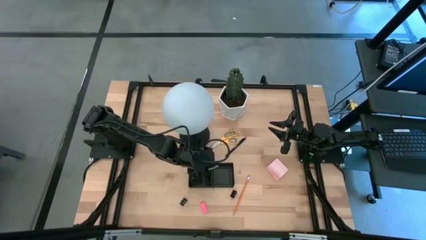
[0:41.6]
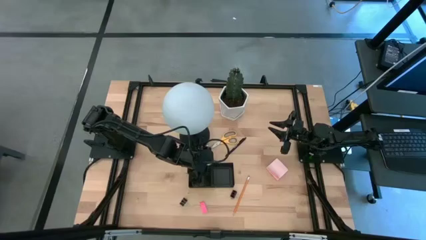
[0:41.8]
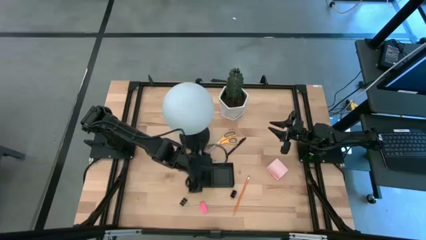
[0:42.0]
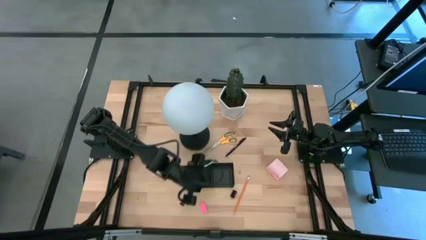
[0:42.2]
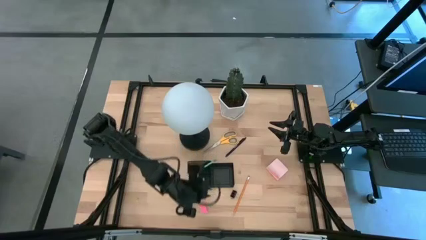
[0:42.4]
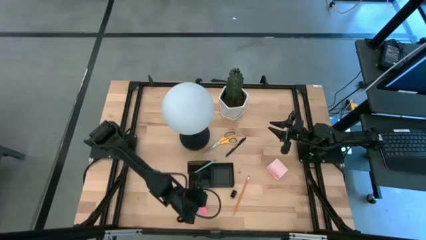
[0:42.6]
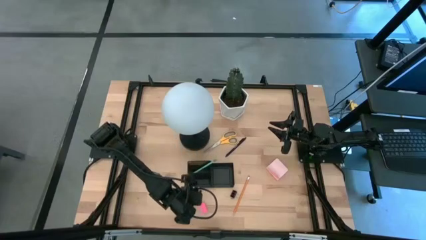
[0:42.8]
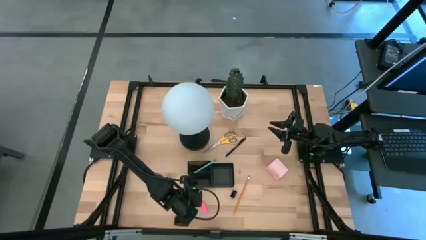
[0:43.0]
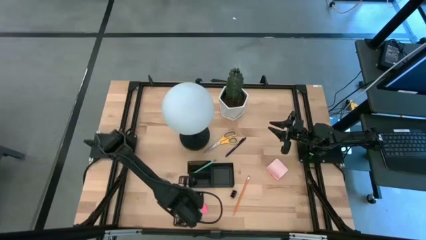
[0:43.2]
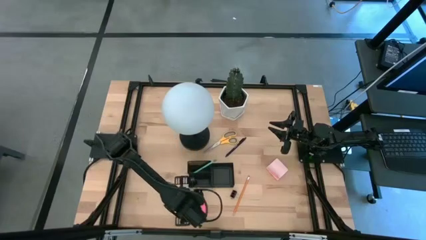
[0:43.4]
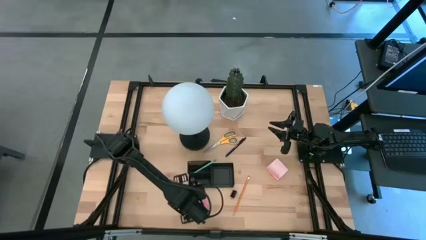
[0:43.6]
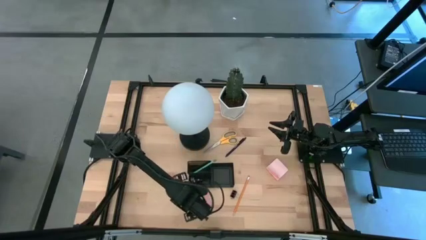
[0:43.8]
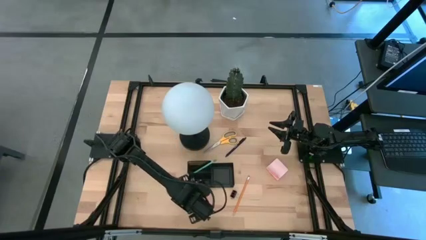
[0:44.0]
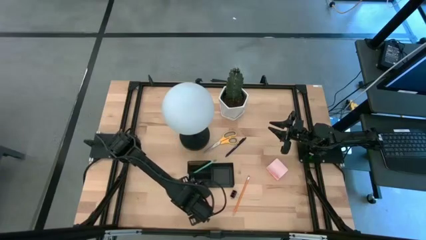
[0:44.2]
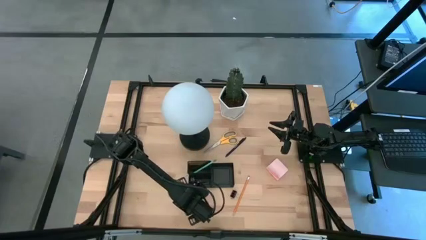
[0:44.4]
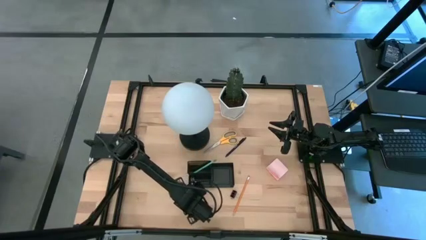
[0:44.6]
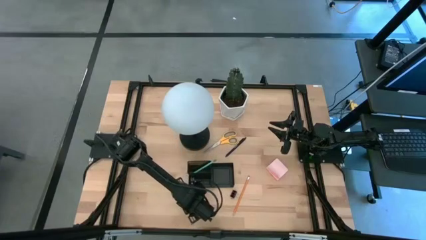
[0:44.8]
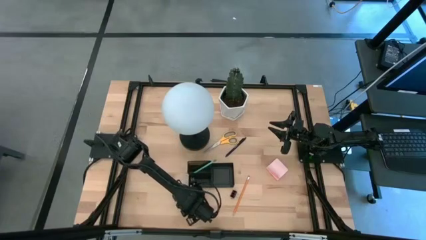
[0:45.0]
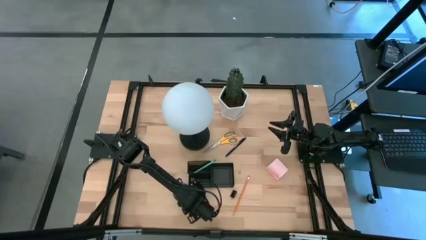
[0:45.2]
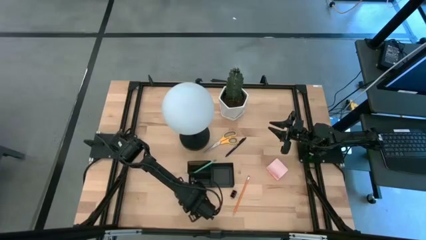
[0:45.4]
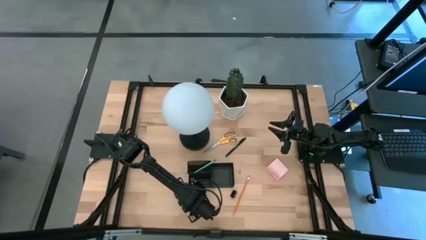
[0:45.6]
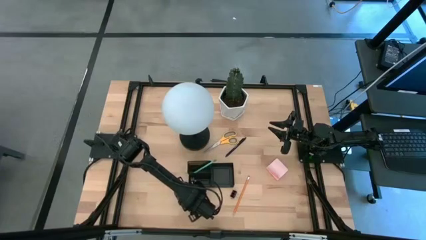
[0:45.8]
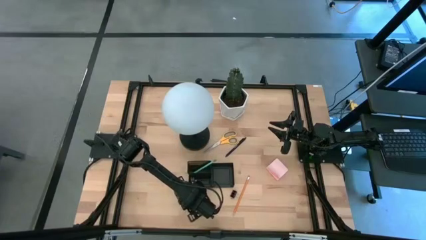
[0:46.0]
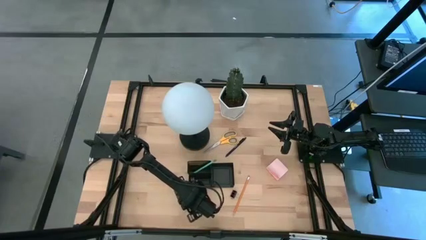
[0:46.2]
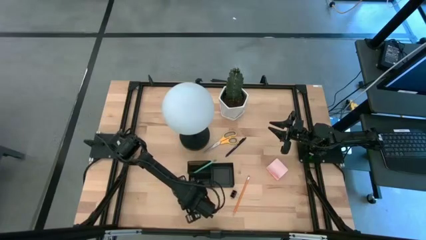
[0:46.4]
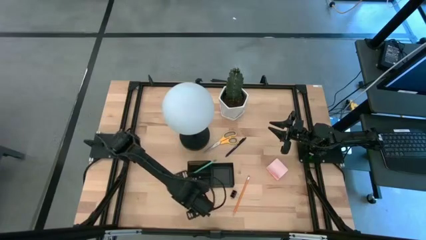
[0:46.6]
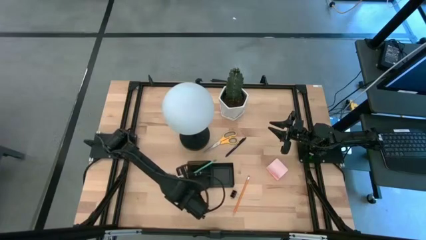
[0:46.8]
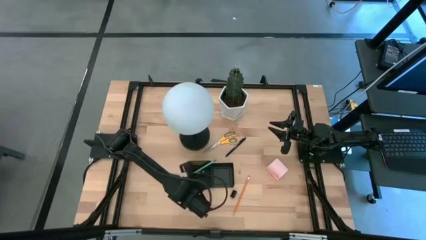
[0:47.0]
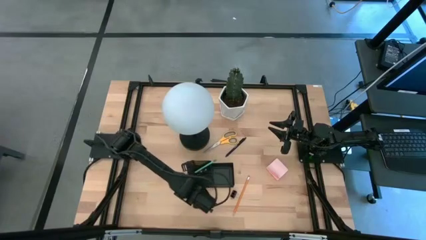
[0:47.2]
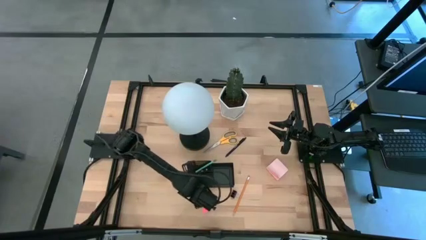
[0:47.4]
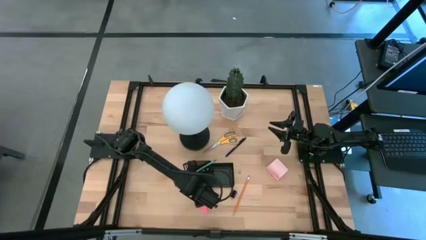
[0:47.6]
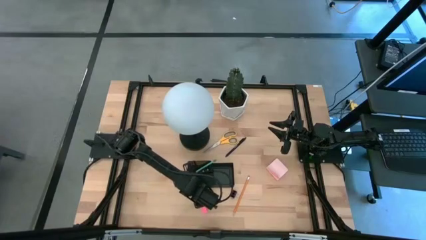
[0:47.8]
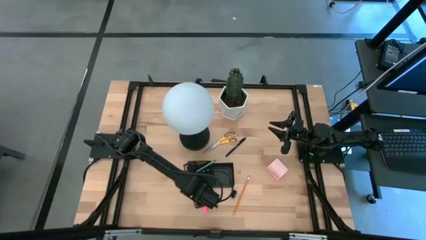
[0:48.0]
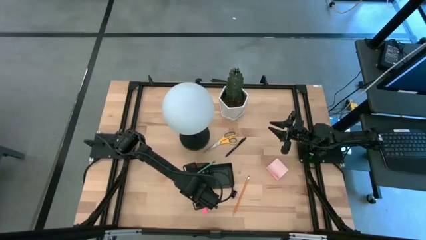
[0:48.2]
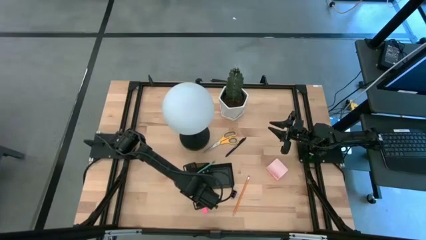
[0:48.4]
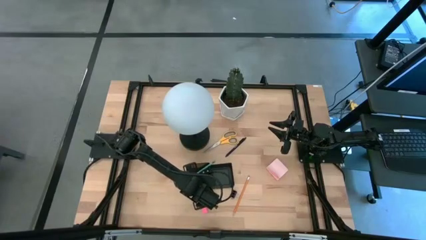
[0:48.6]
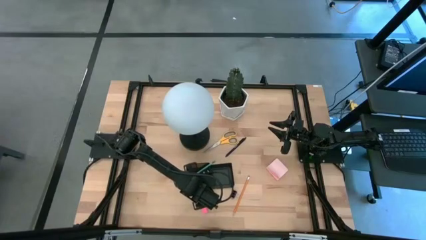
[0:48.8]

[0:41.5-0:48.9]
Task: Pick and place office supplies into organizer
Put the left black binder clip into the desk organizer

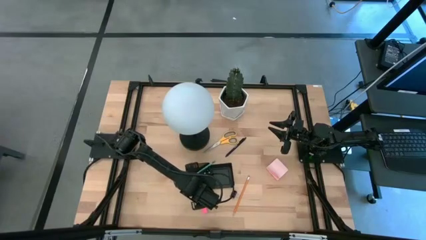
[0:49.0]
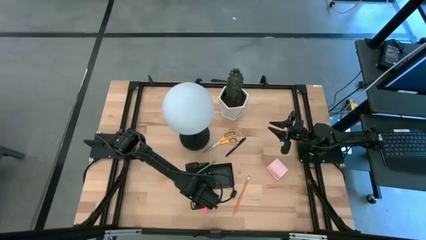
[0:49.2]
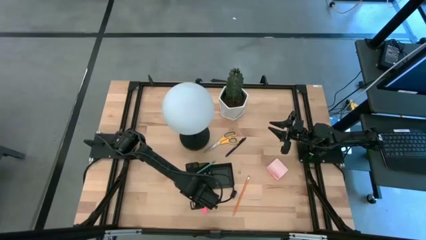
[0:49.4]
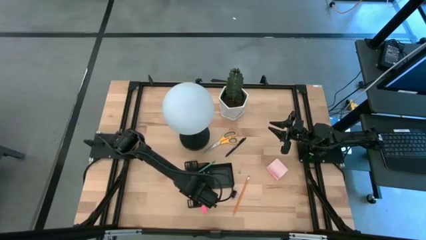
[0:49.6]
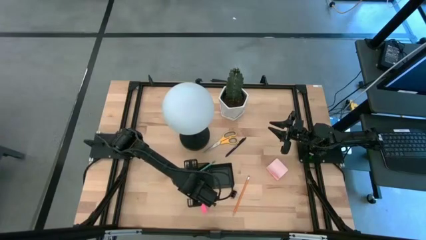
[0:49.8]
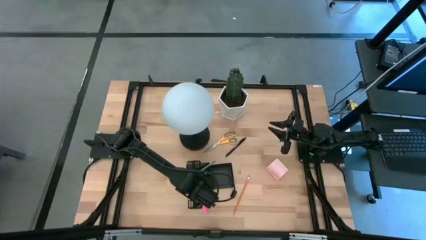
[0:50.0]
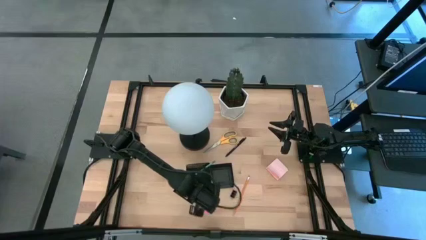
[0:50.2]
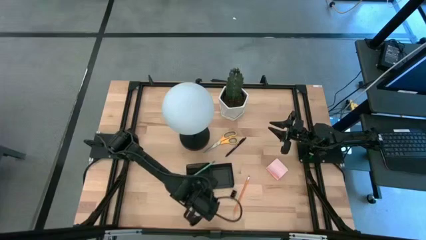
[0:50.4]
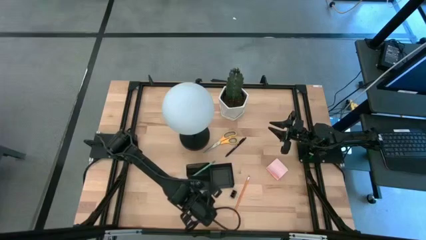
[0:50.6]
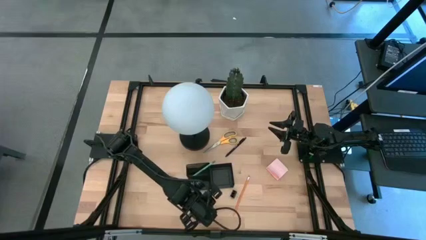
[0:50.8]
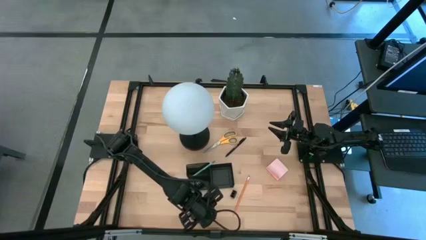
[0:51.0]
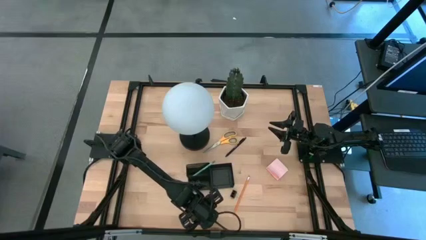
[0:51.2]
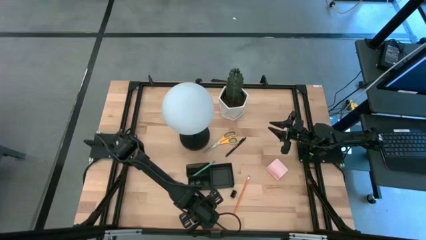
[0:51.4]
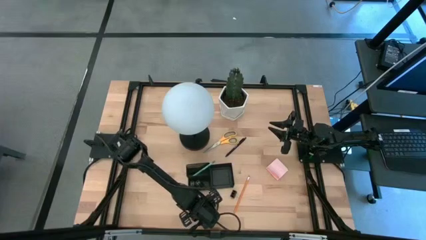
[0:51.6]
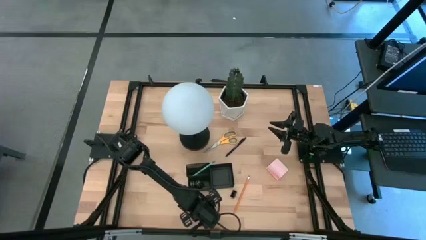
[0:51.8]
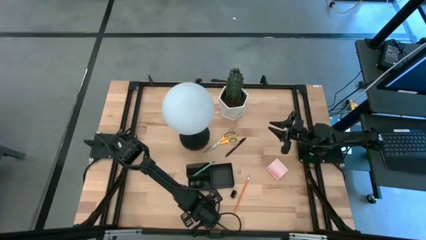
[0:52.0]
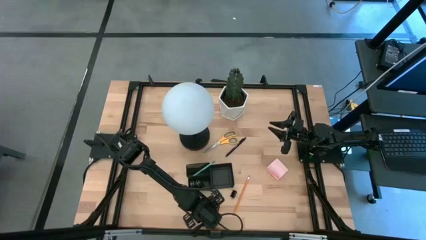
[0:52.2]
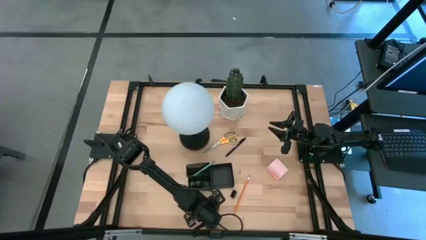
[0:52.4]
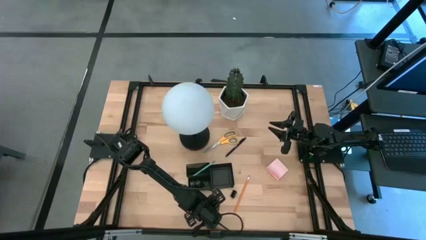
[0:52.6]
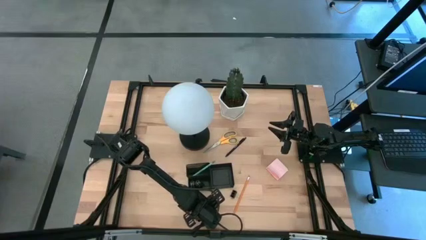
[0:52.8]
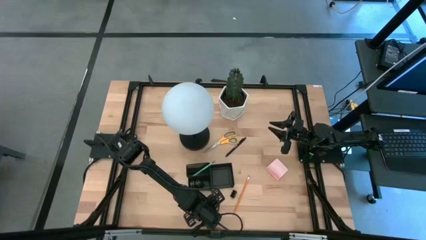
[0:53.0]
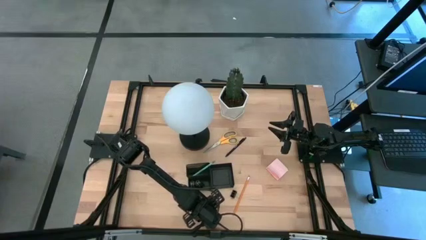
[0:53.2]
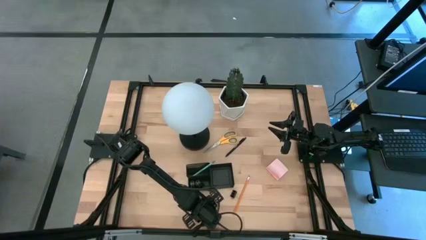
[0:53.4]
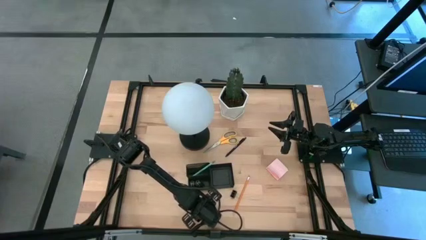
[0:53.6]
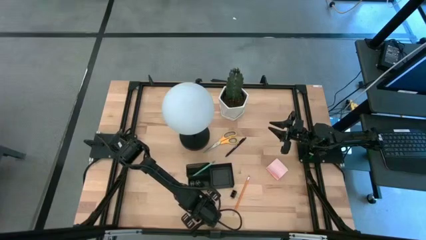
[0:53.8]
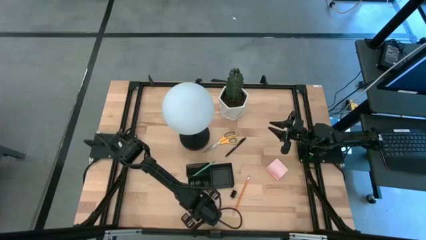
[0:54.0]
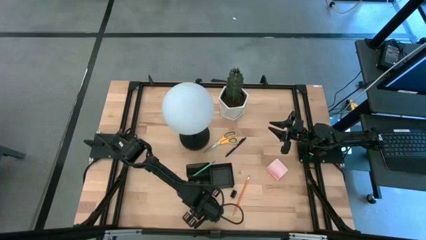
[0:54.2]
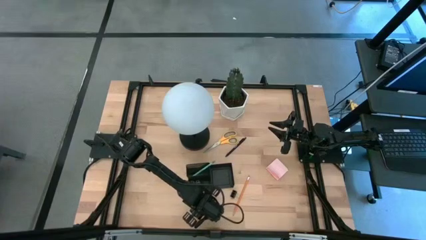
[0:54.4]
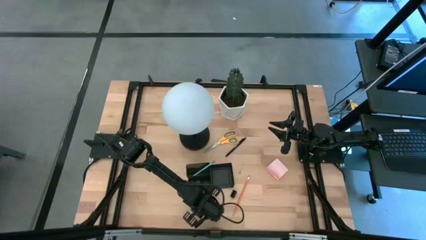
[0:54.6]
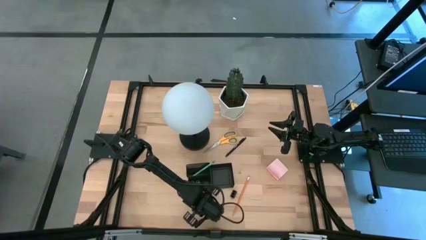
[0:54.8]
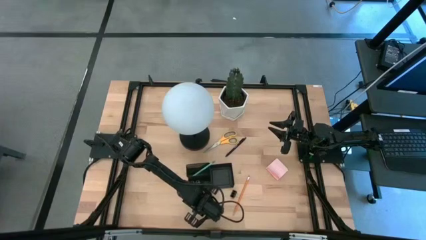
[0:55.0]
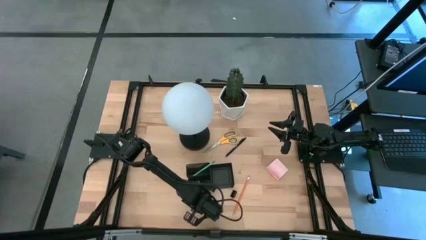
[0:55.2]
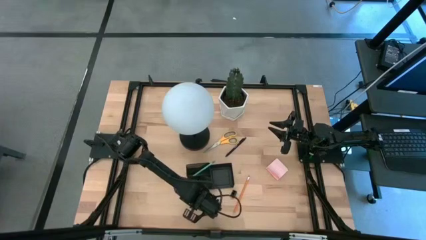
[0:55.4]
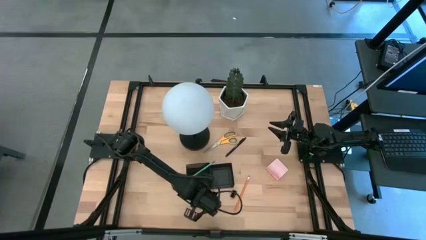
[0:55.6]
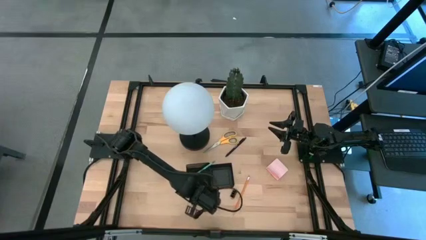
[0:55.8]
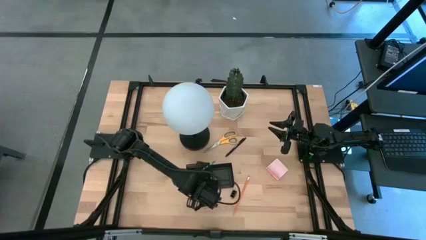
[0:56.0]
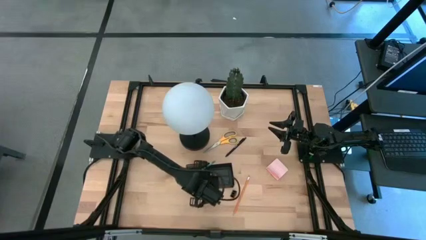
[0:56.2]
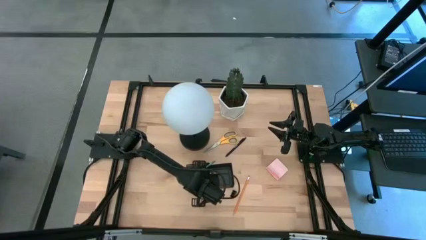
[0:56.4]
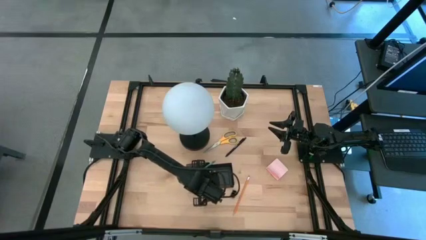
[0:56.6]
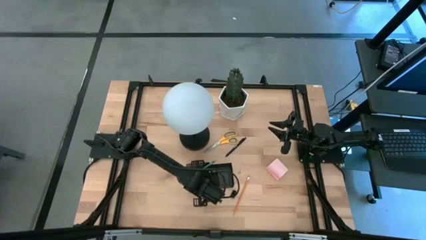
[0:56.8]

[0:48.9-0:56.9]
Put the pink eraser into the desk organizer
